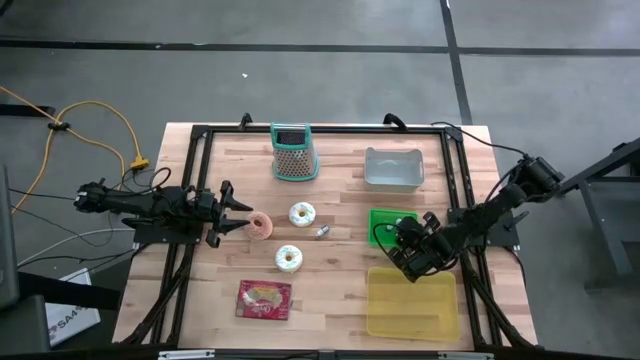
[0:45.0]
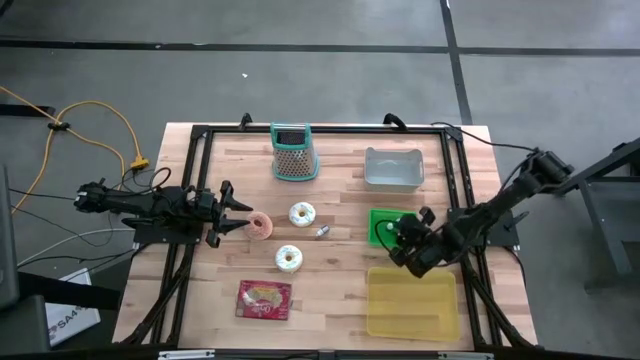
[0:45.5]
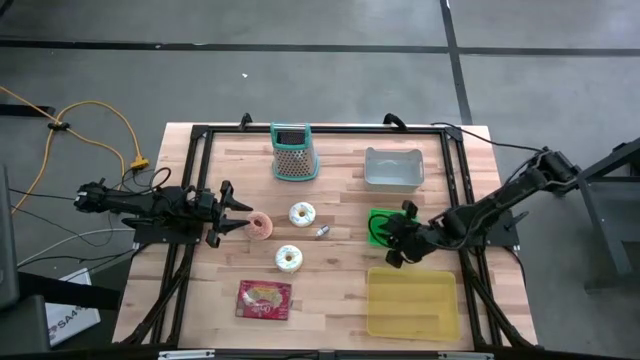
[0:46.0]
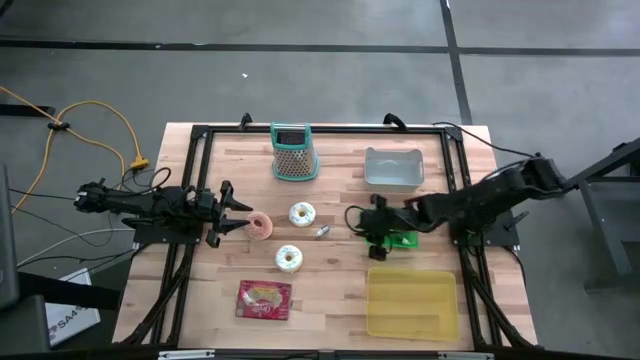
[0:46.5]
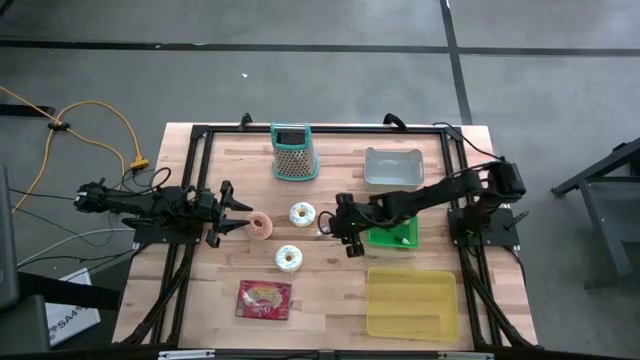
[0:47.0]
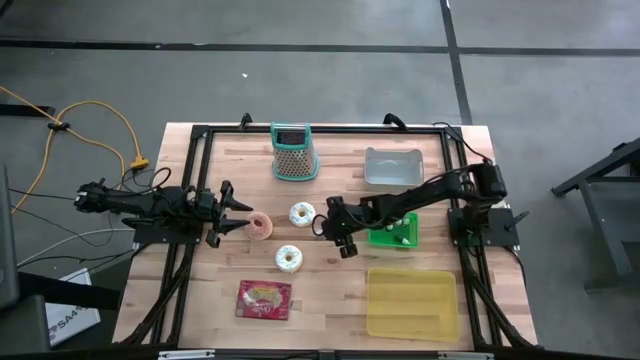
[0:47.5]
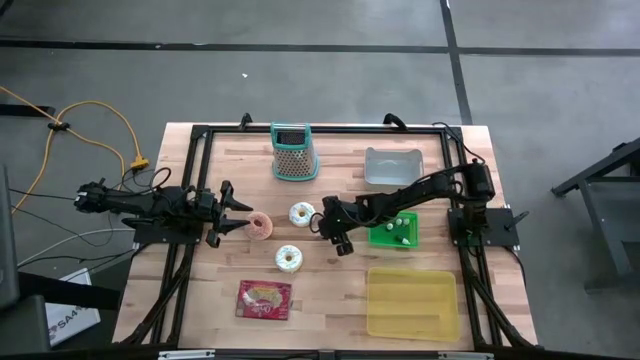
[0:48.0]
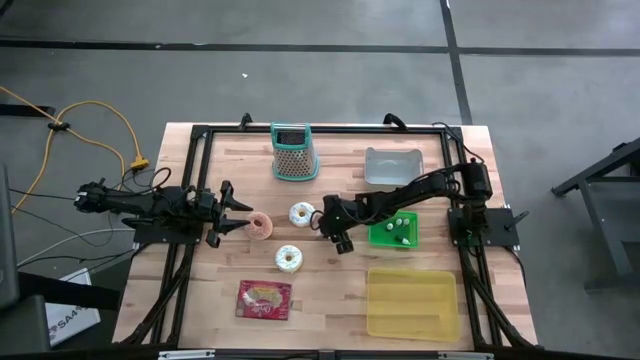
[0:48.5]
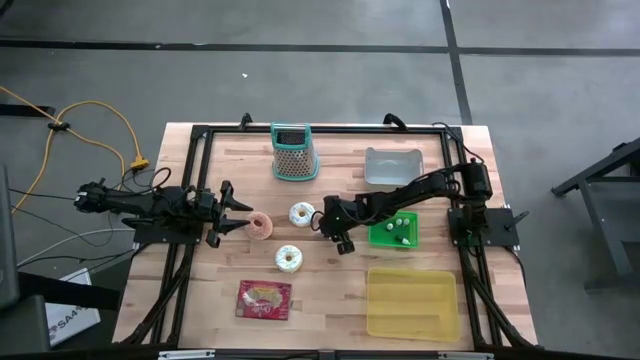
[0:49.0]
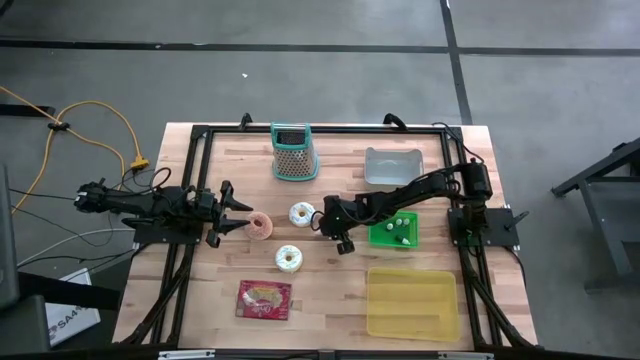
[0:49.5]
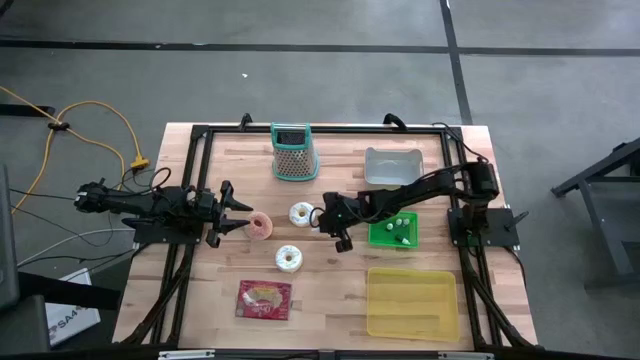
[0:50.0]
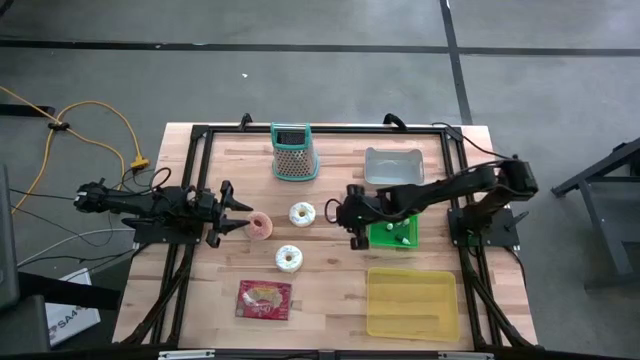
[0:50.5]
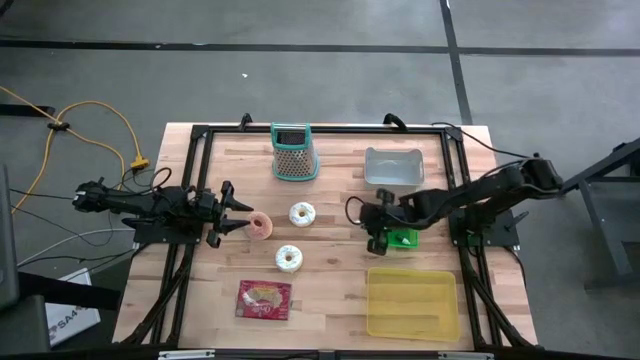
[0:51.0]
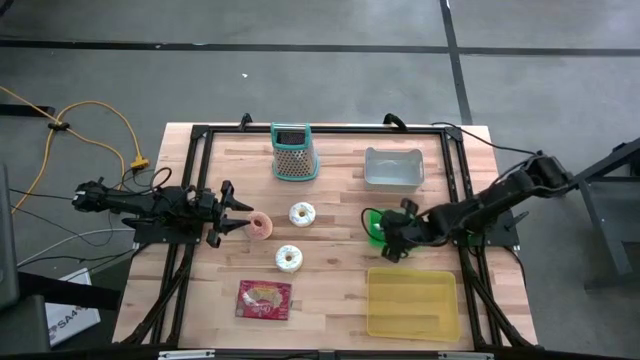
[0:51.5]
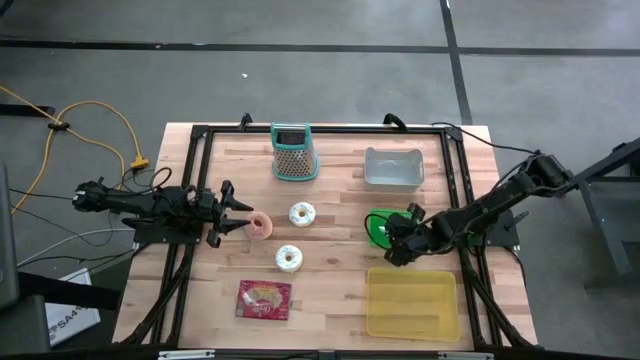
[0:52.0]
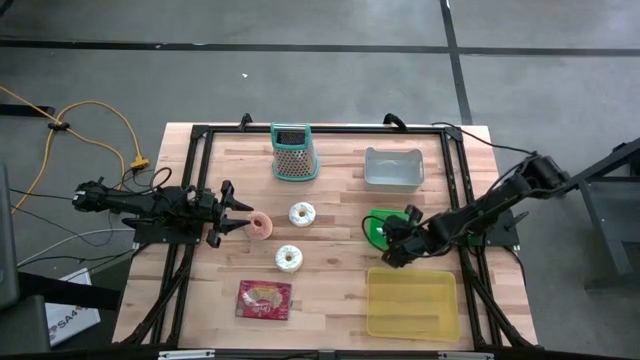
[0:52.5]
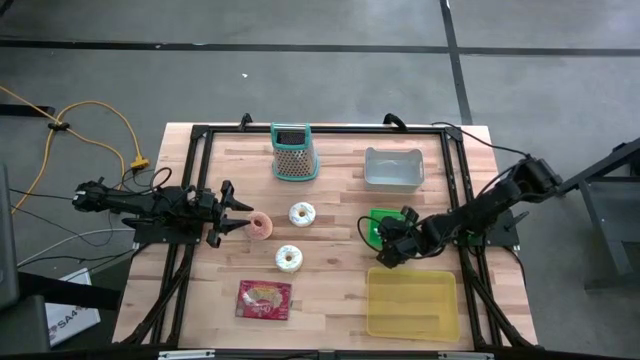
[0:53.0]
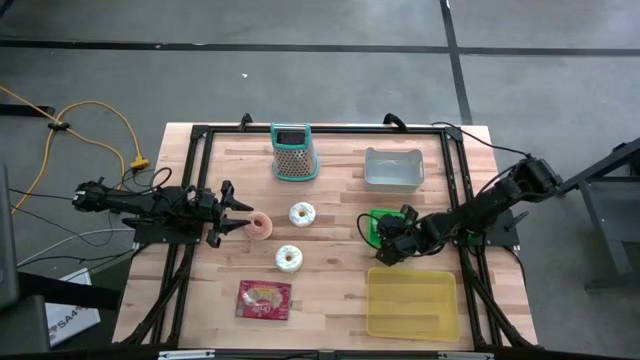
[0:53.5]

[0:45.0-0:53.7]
Put the black food coloring bottle into the green bin

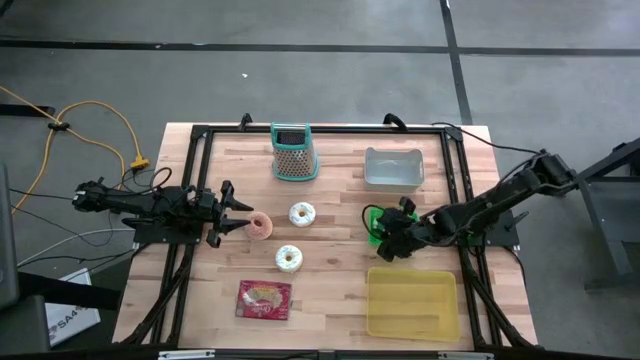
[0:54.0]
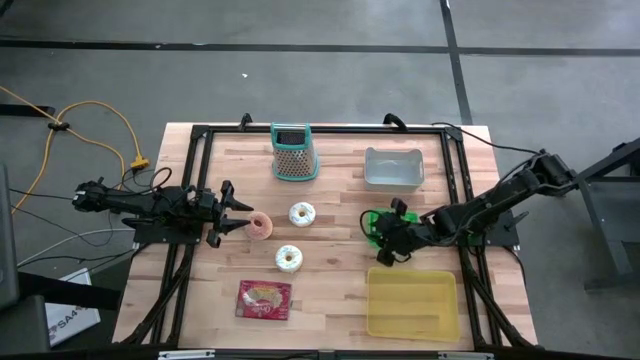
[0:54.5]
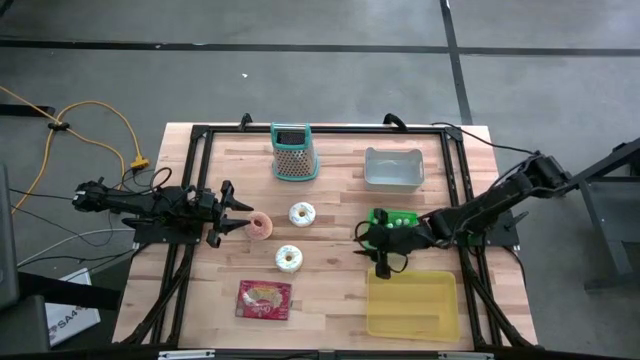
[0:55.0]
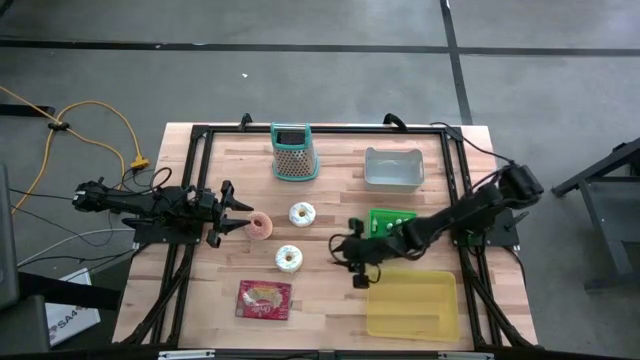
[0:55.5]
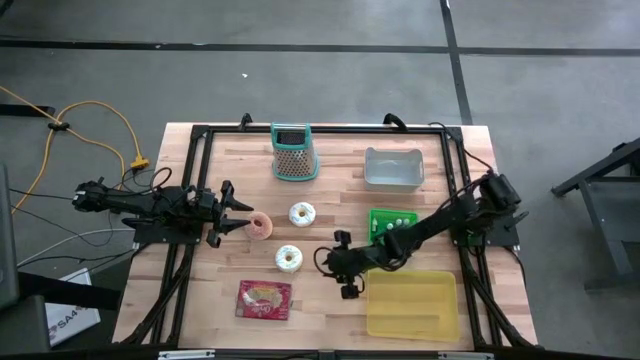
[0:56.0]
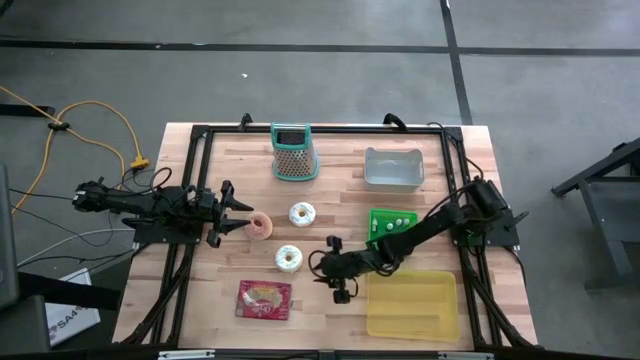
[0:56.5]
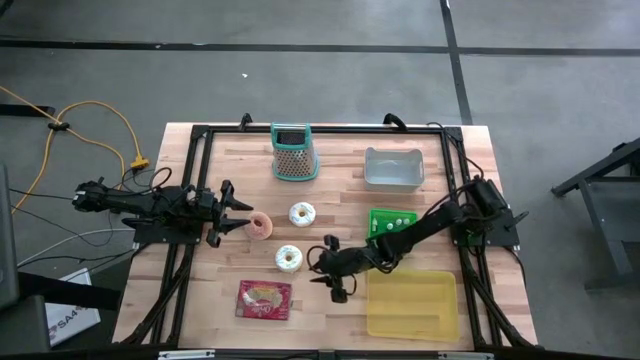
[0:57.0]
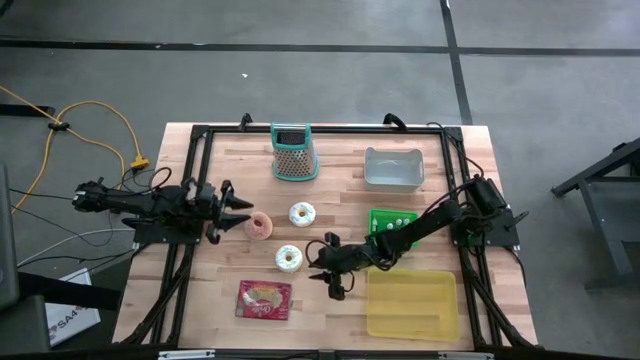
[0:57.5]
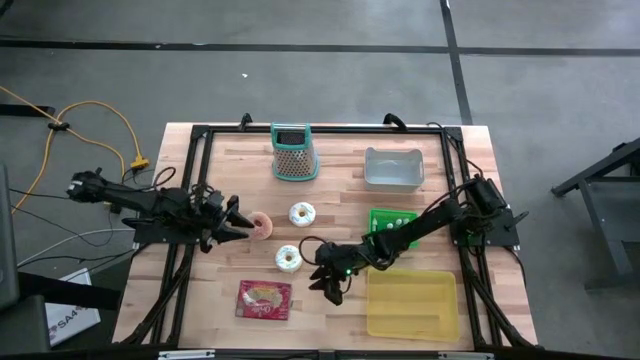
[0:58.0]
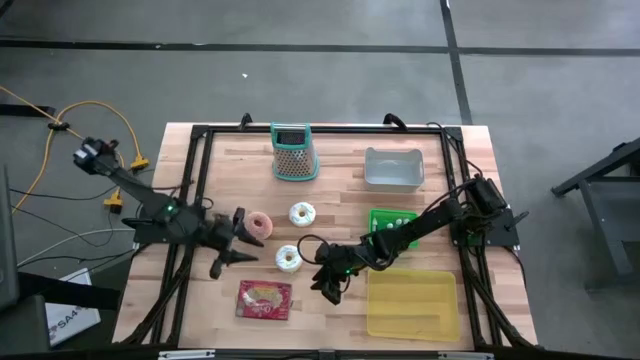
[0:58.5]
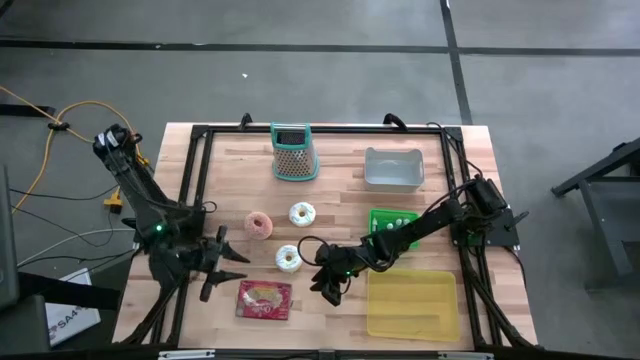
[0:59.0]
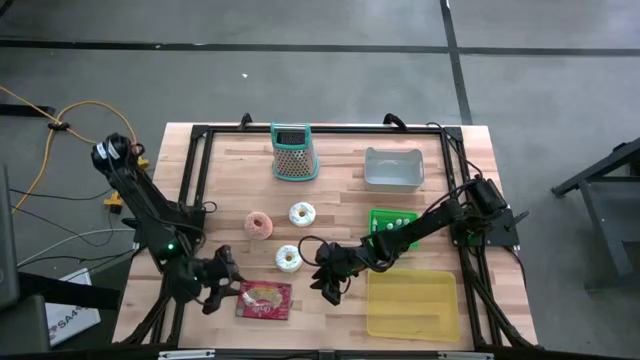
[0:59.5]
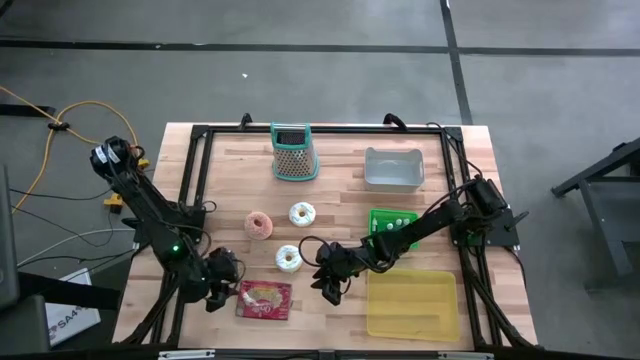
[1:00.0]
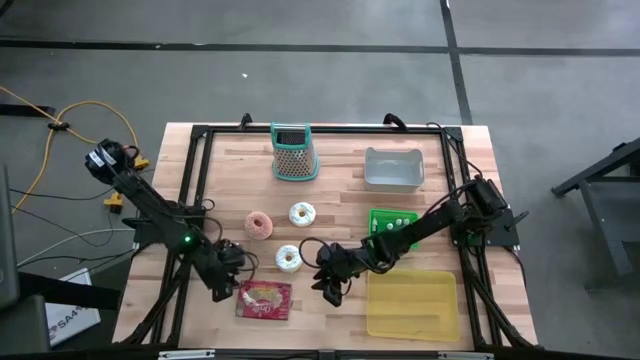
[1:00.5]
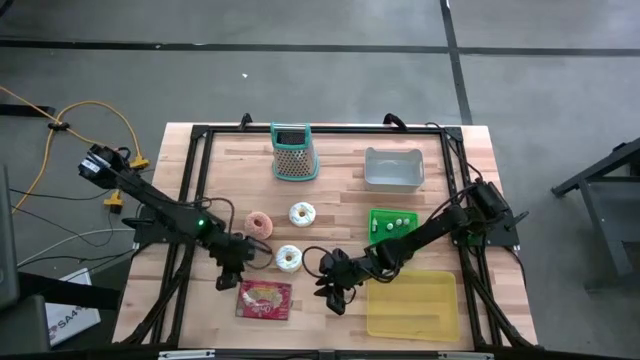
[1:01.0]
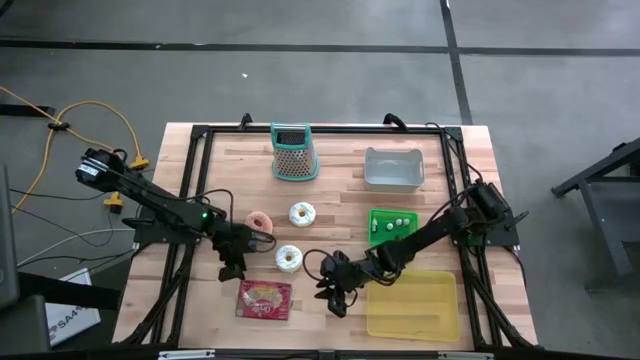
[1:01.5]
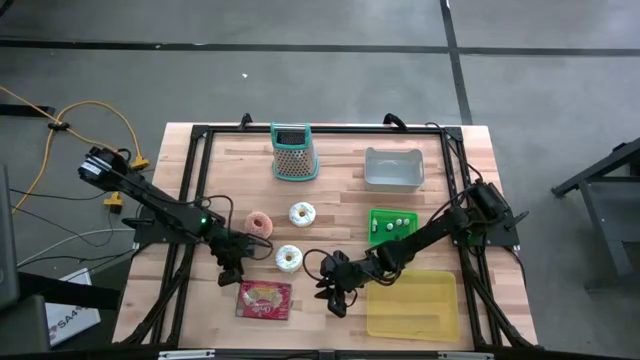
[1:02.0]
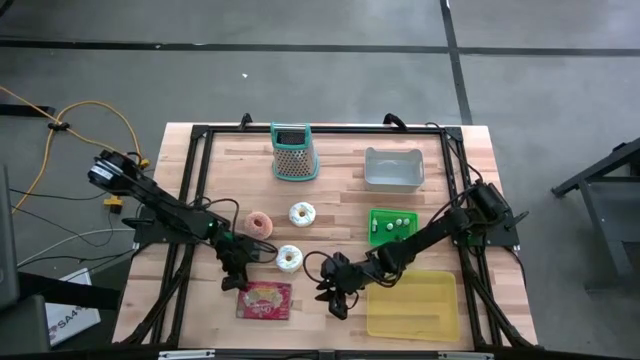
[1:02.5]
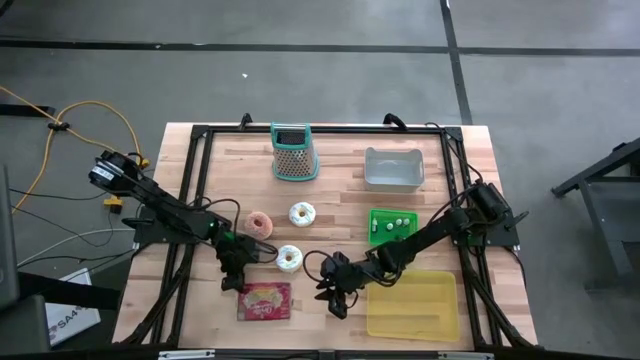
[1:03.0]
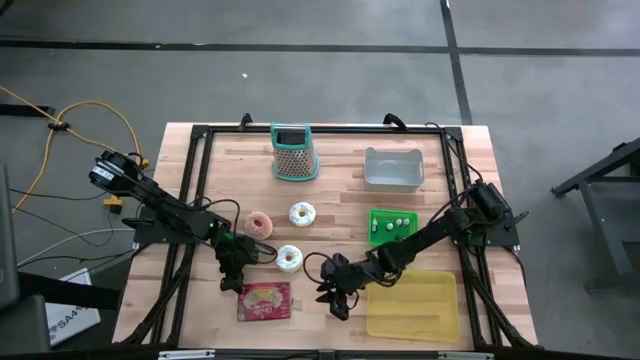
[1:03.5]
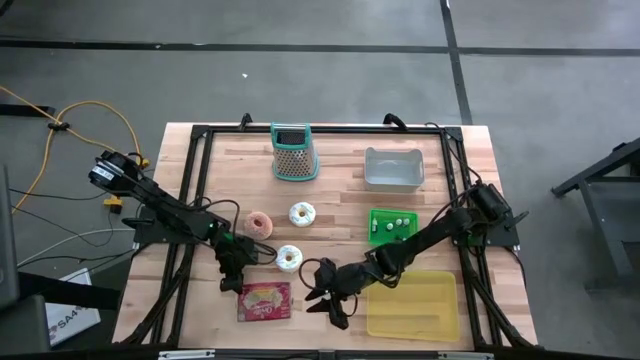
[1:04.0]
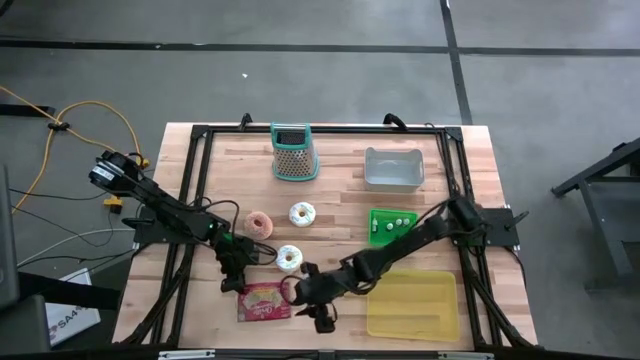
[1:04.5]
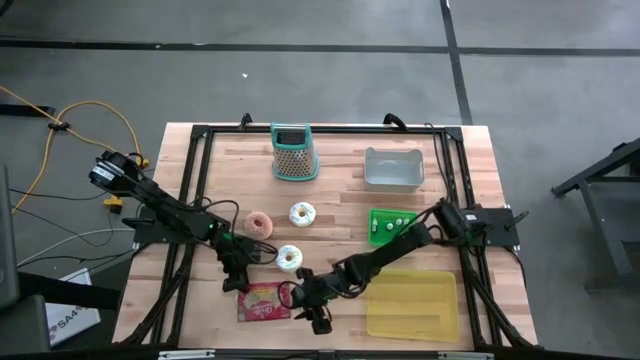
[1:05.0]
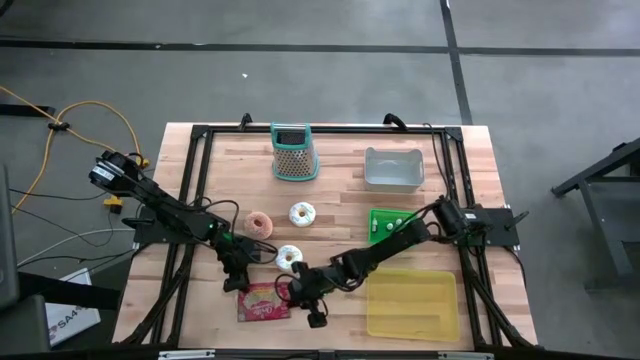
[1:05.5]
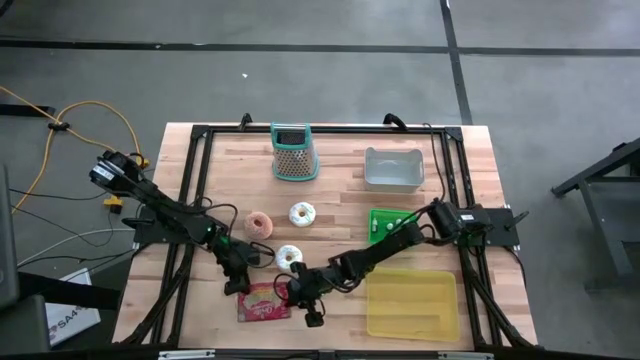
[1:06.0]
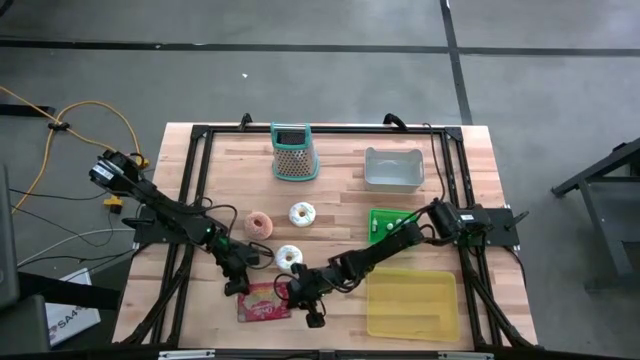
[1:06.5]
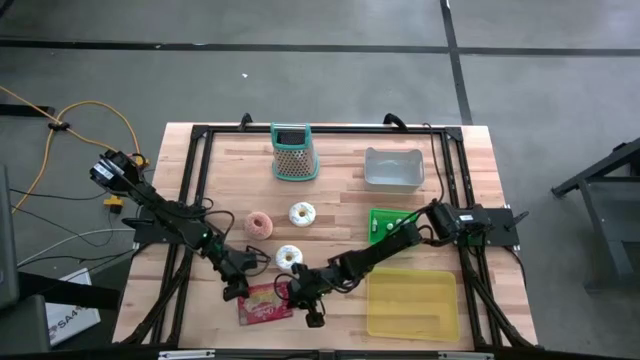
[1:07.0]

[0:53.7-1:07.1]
Put the red popcorn bag into the yellow bin
